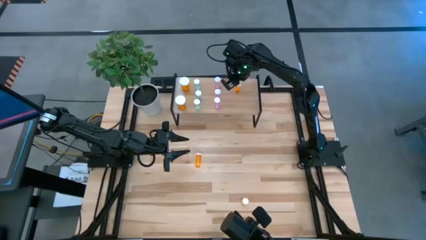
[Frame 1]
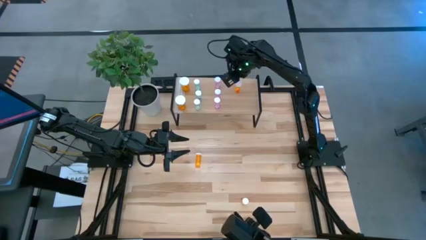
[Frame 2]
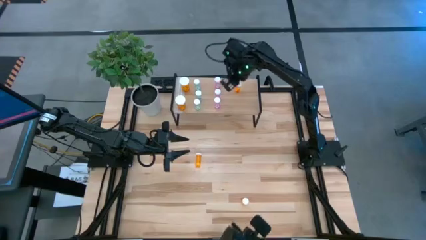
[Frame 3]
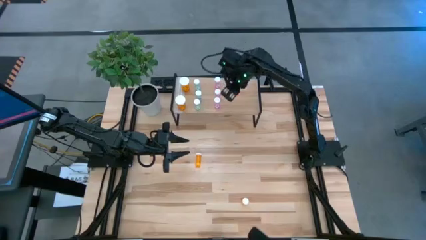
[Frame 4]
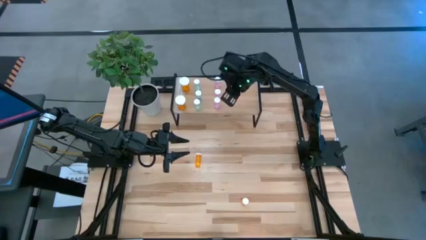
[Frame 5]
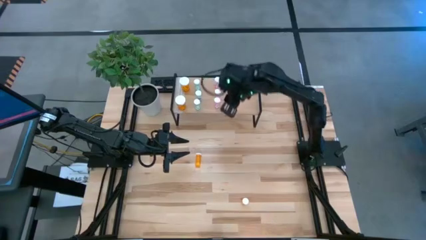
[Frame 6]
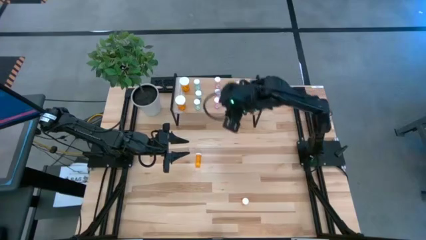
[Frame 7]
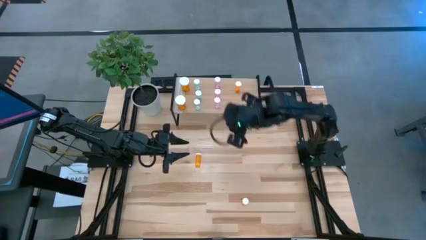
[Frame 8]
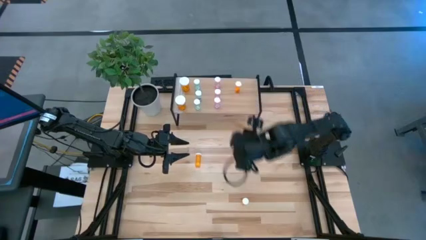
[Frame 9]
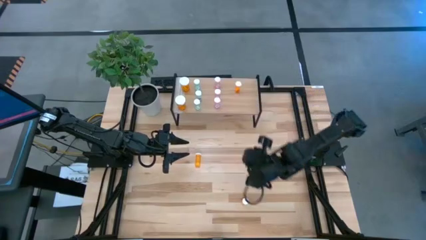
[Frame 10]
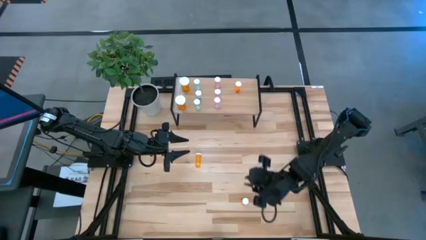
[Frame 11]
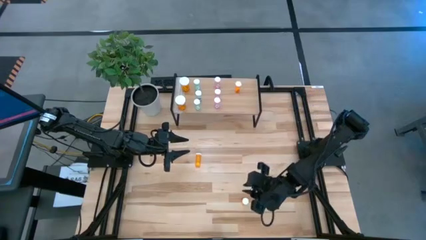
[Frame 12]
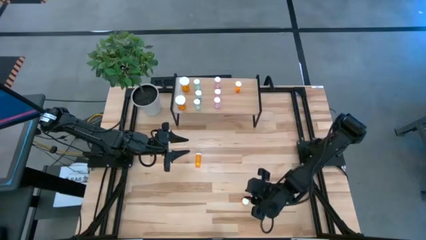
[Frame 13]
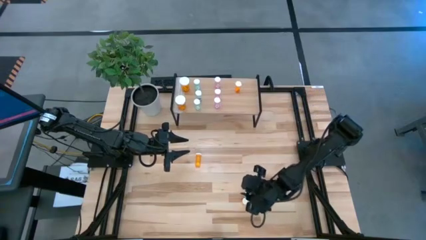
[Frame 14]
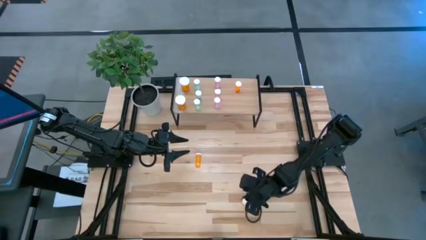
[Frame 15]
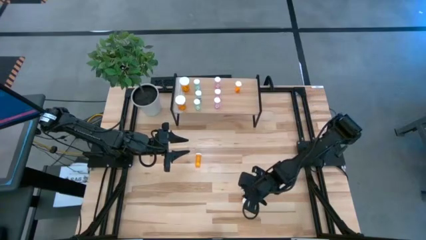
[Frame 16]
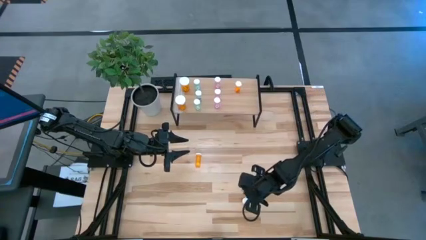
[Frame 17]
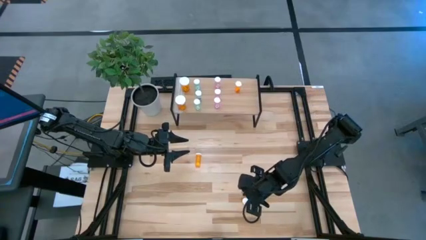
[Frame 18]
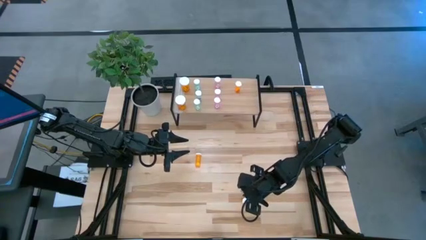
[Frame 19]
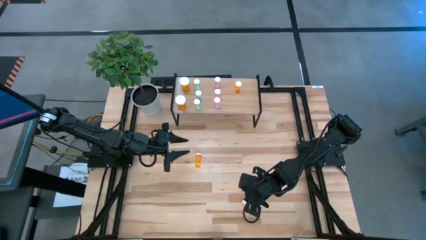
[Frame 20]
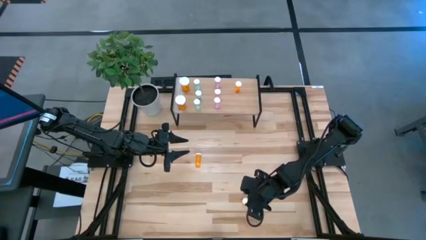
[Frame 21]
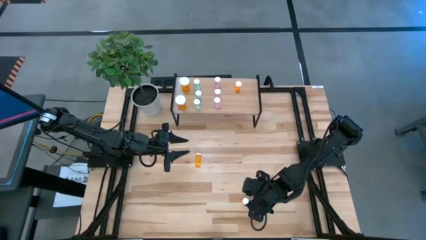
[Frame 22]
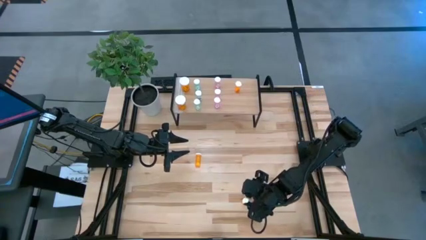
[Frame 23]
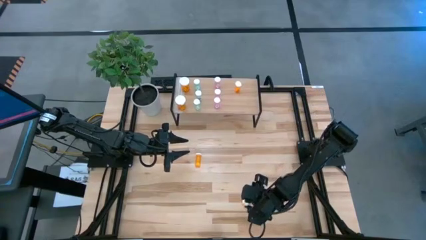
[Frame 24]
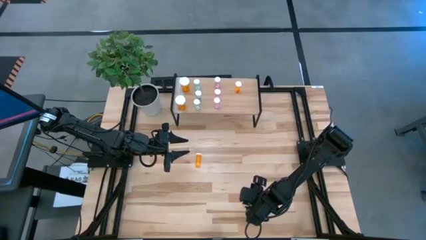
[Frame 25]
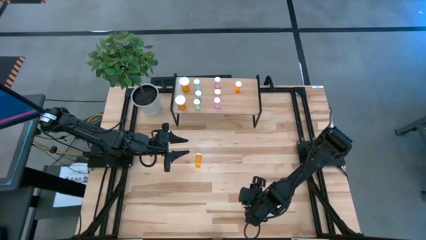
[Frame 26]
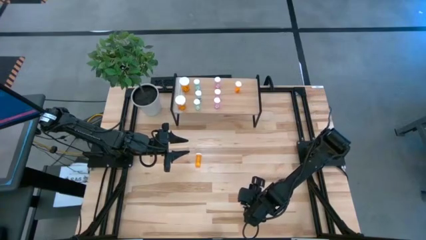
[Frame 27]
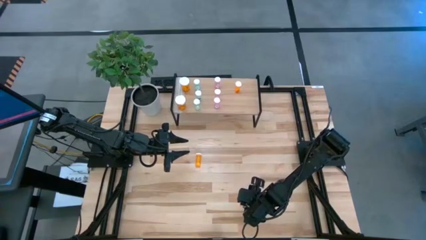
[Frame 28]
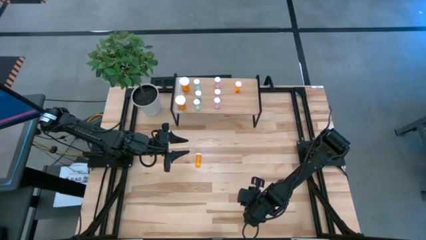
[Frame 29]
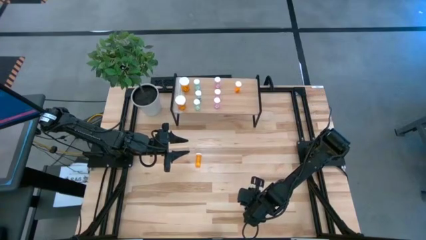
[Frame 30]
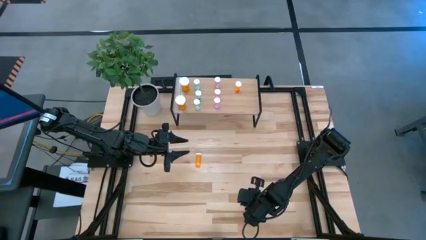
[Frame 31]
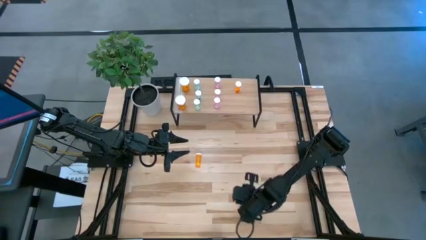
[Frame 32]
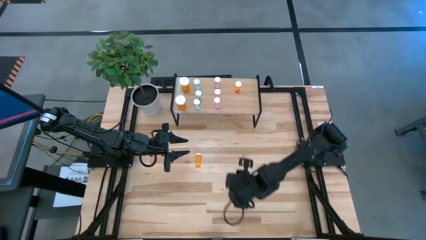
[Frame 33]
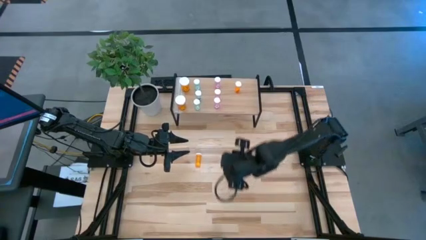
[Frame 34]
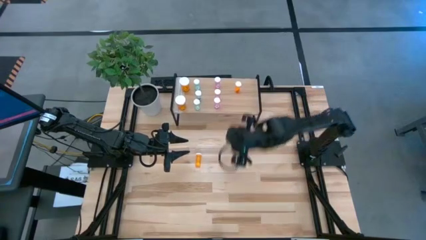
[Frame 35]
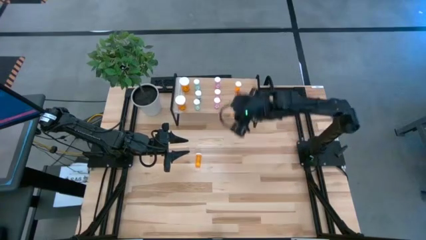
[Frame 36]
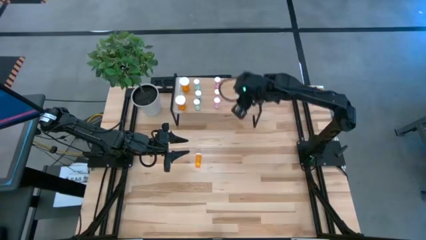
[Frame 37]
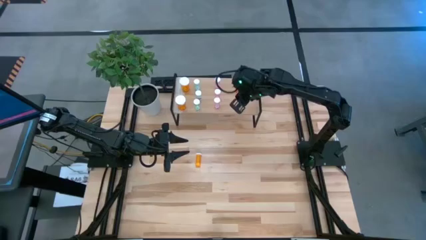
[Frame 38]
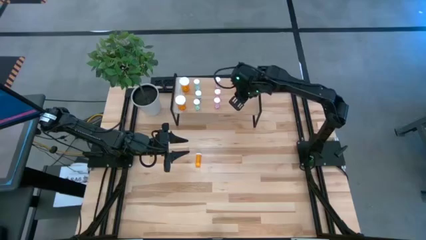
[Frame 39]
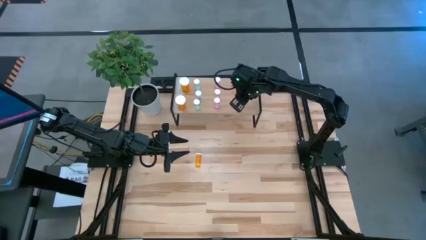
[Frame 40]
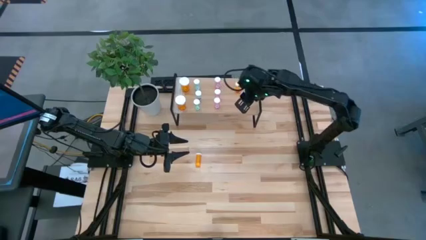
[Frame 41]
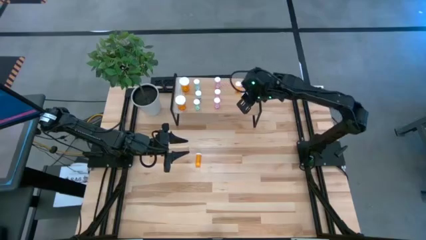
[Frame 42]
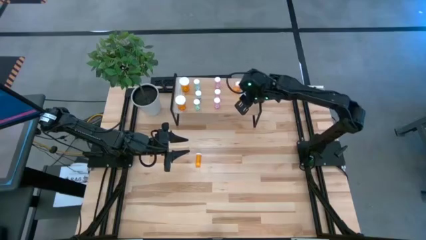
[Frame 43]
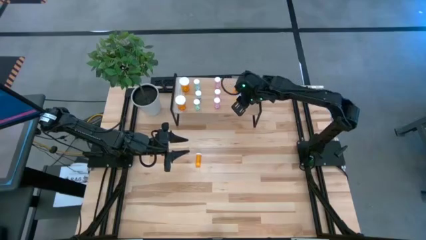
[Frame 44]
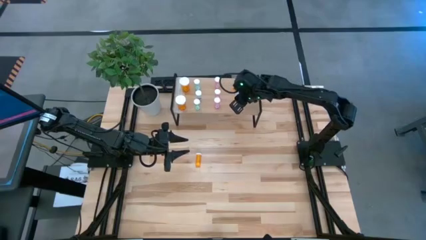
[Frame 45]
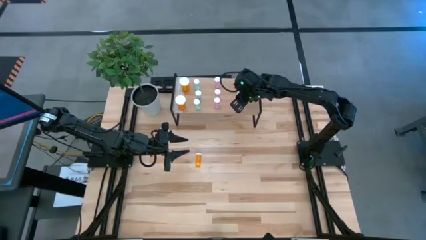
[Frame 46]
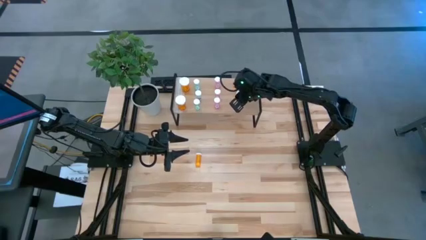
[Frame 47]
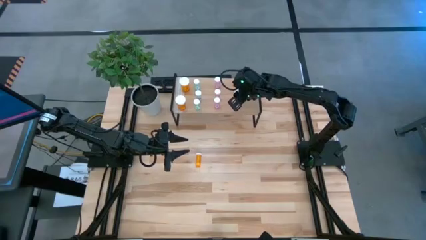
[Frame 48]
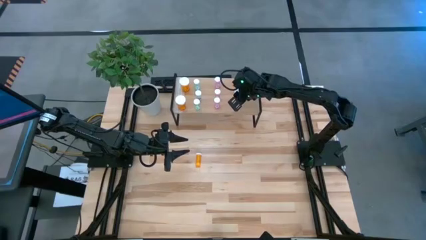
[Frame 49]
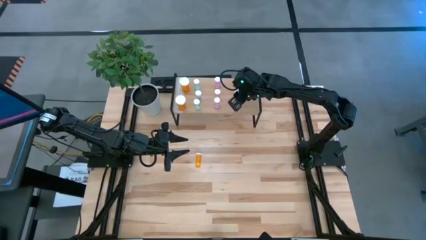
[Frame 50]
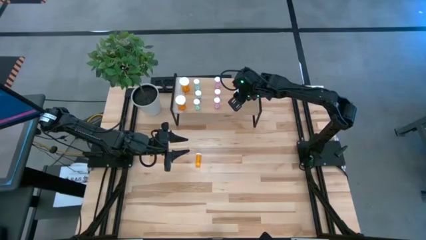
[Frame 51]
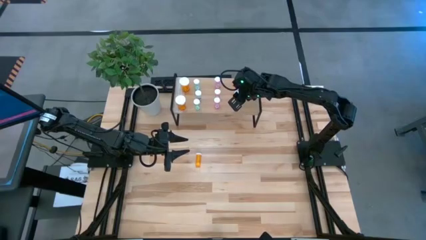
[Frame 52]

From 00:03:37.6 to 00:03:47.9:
Task: Pick and place medicine bottles onto shelf by color
Put the bottom small orange pill bottle on the shelf aligned with the other small orange pill bottle
